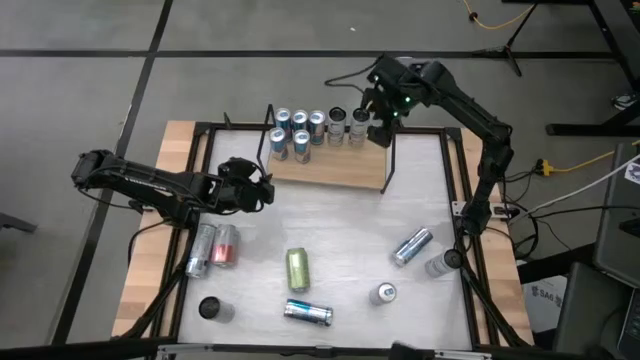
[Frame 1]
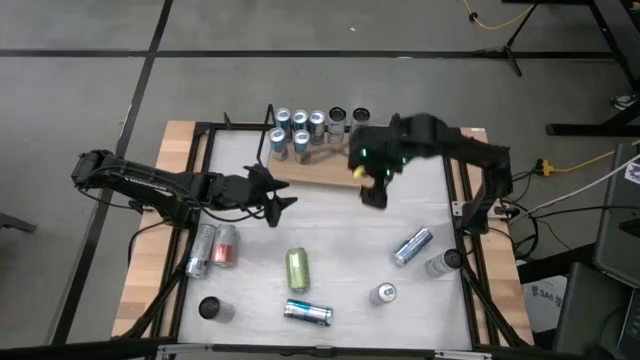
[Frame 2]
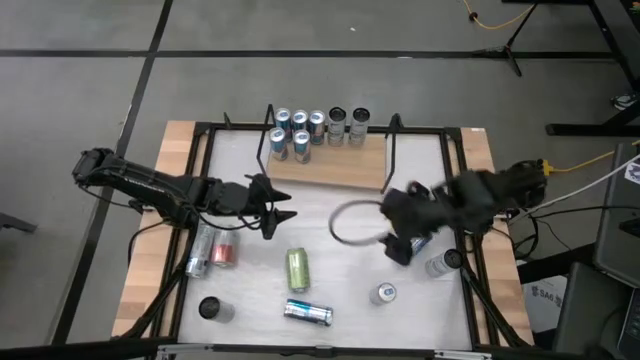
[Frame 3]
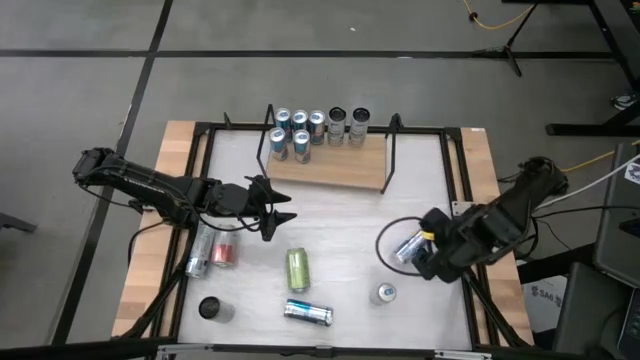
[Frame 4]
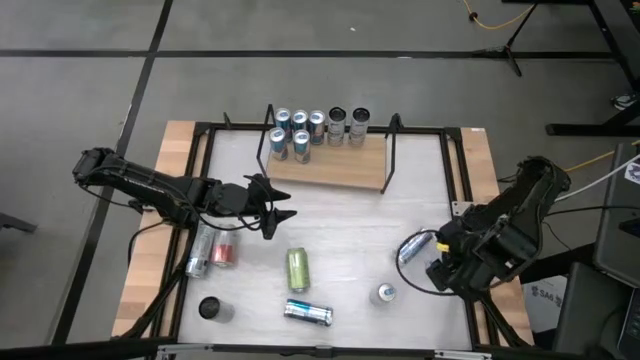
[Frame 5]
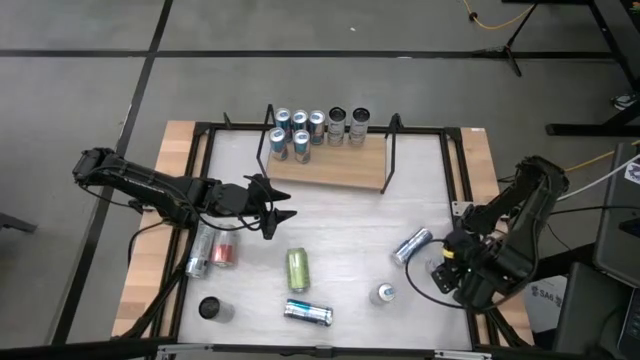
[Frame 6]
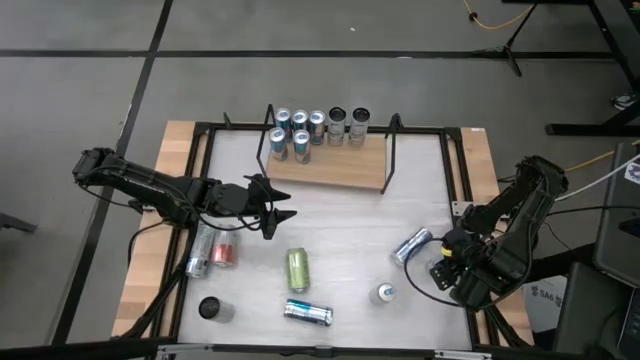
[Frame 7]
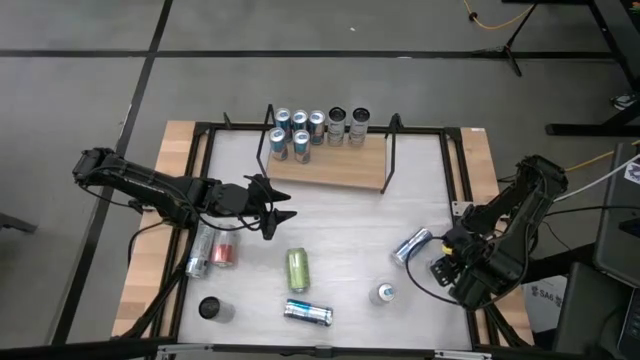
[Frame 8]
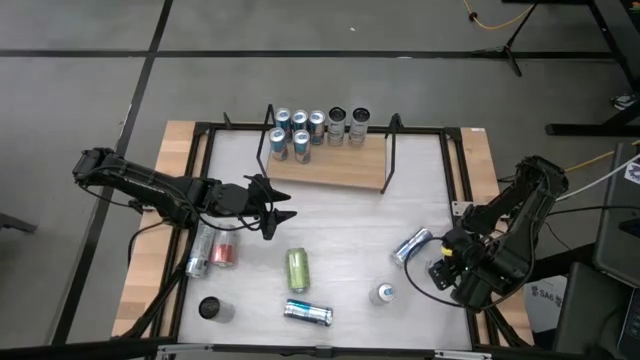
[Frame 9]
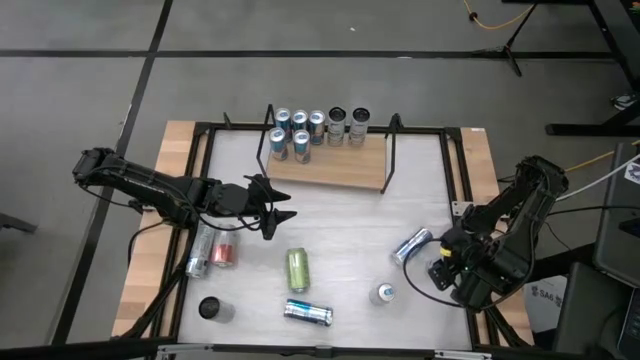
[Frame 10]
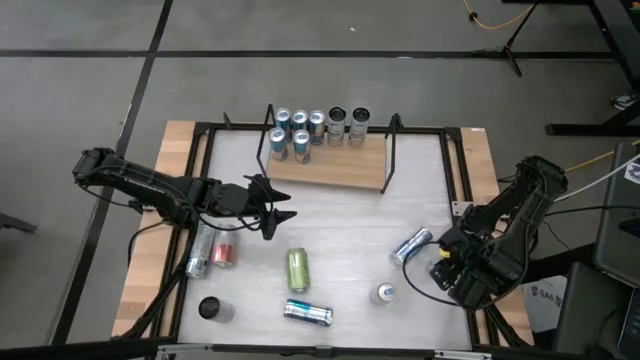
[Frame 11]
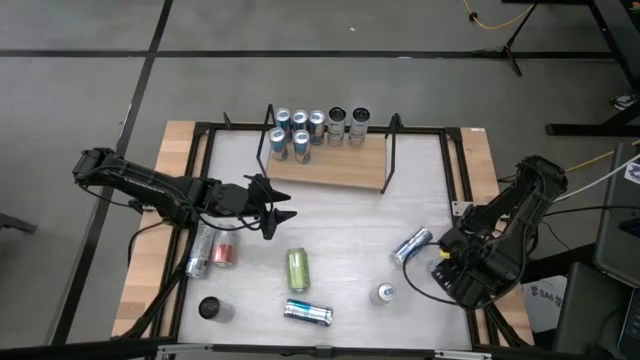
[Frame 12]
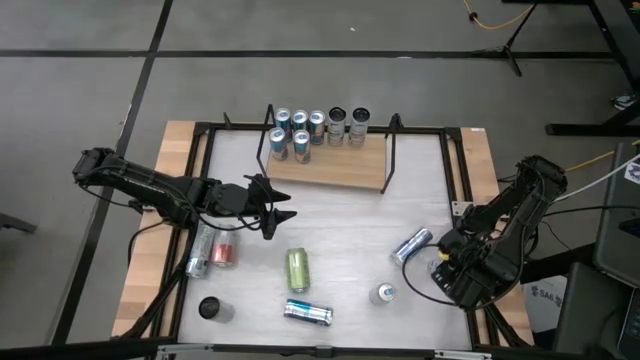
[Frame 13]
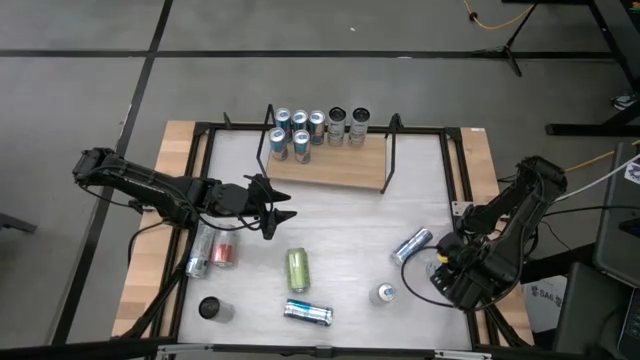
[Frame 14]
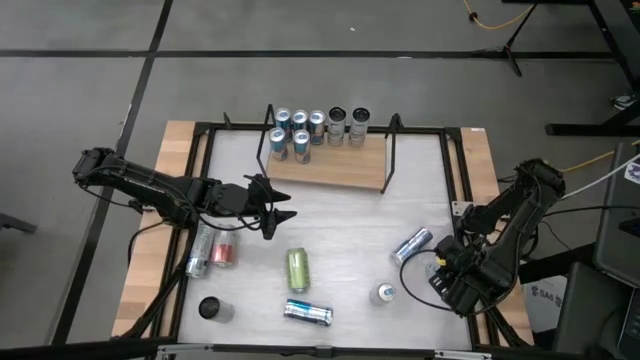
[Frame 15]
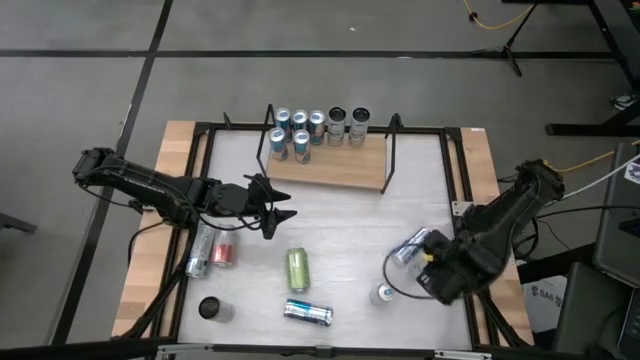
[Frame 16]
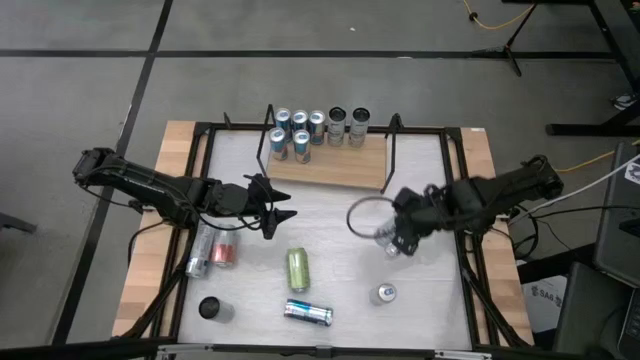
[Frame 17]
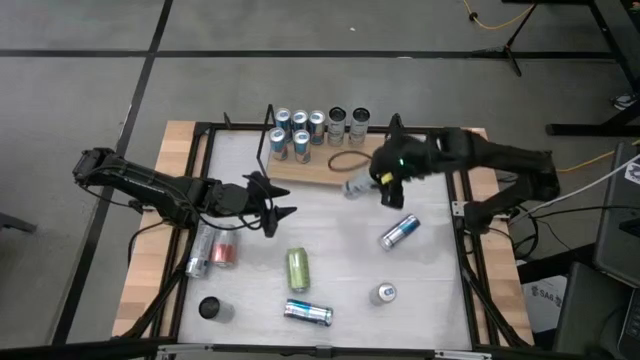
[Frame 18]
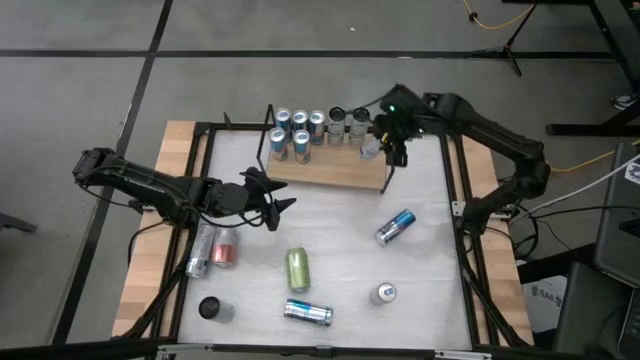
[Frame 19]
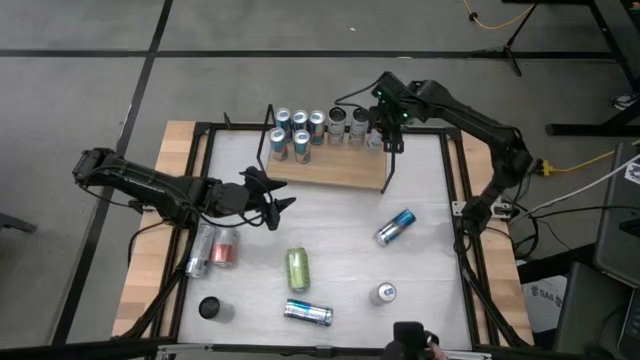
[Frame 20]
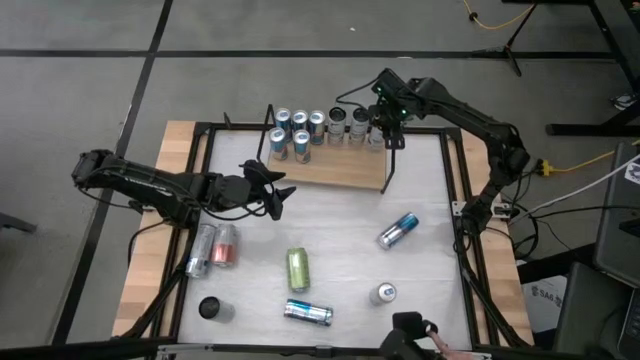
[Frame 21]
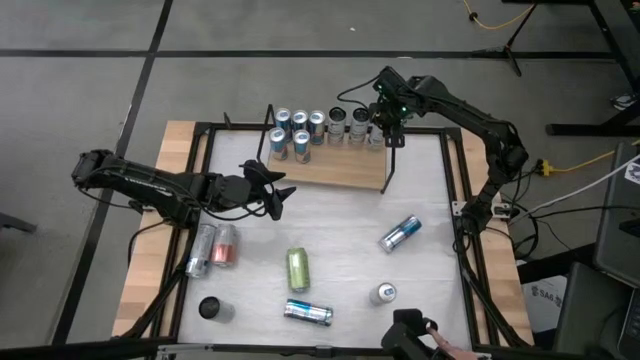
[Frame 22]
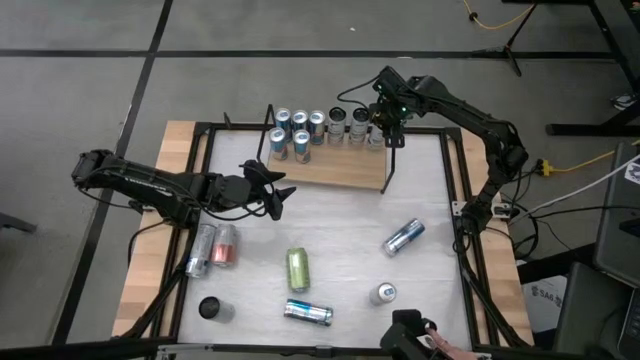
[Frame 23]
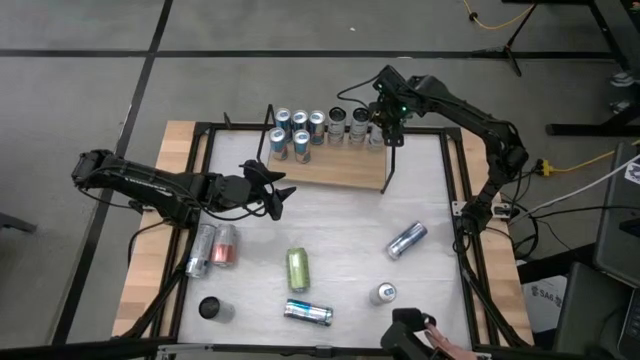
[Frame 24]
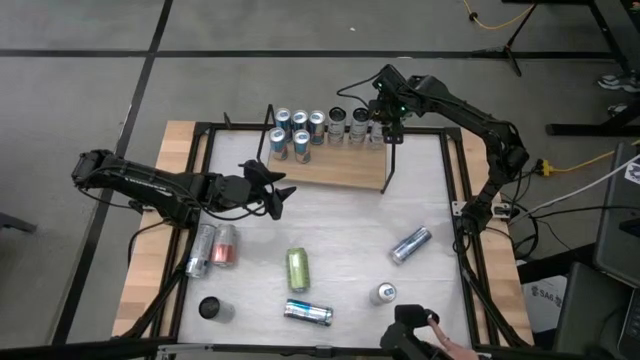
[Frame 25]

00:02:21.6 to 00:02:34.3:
Task: Place canned beverage on shelf
Put the white blue soda can on the shelf

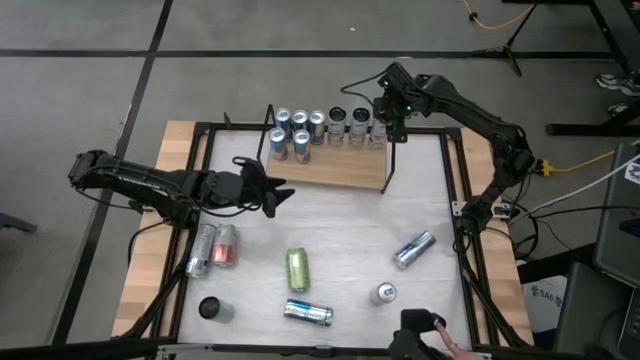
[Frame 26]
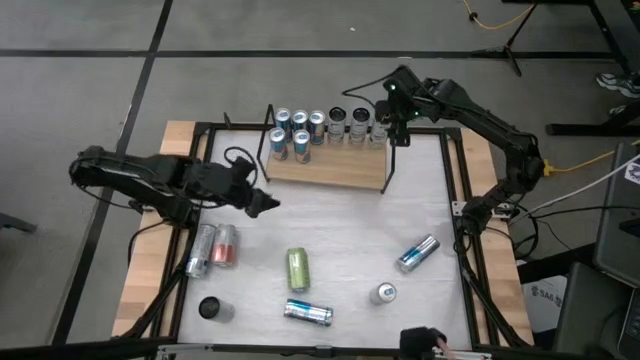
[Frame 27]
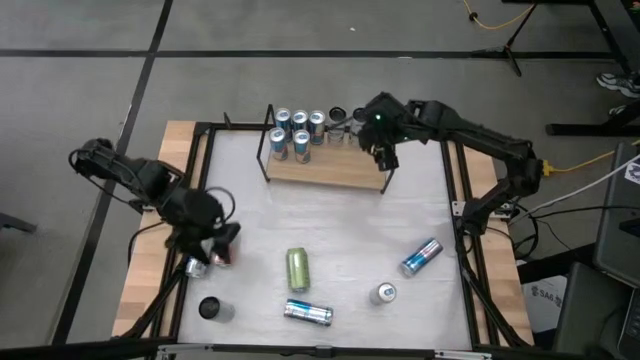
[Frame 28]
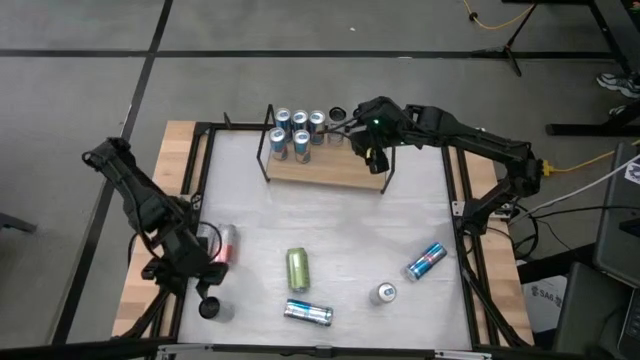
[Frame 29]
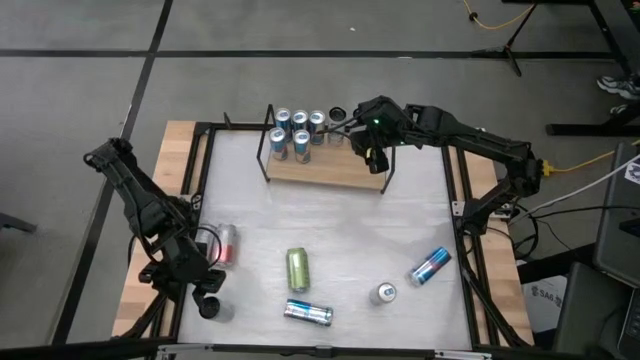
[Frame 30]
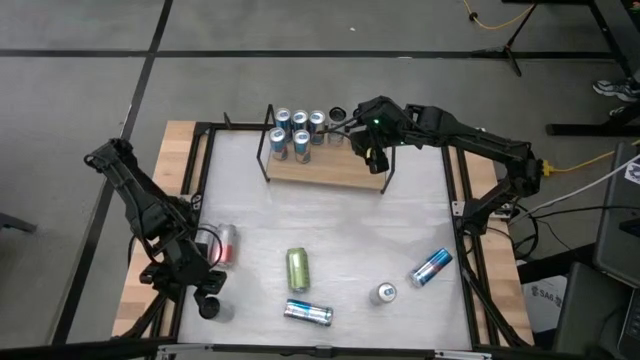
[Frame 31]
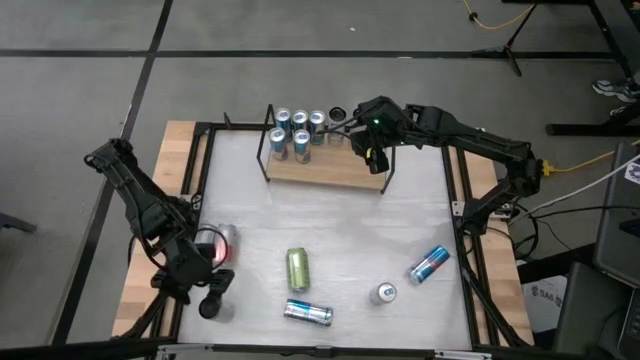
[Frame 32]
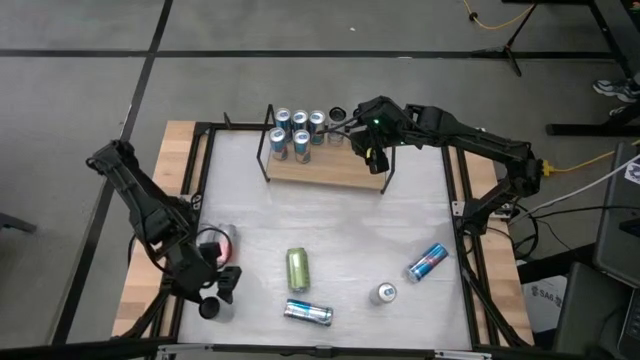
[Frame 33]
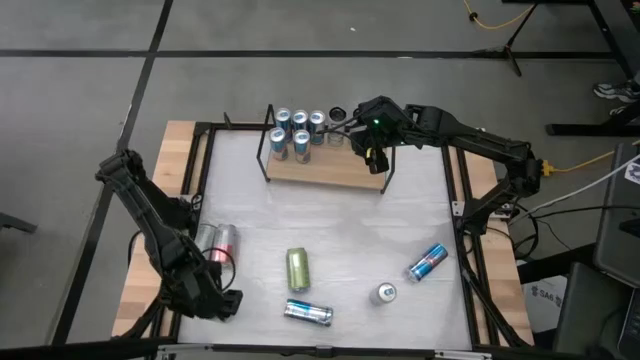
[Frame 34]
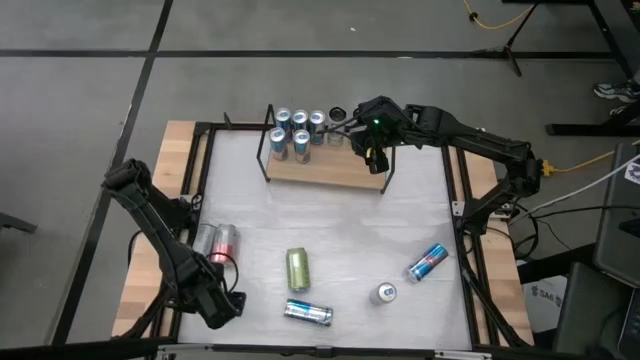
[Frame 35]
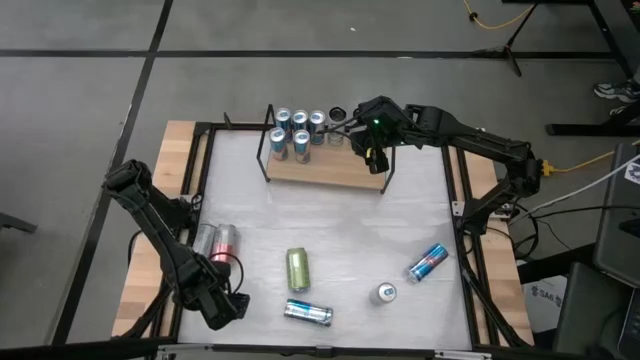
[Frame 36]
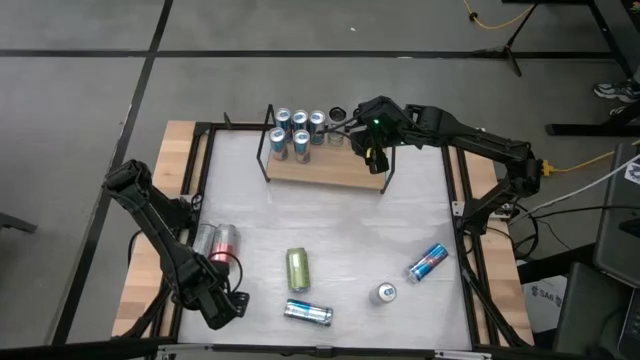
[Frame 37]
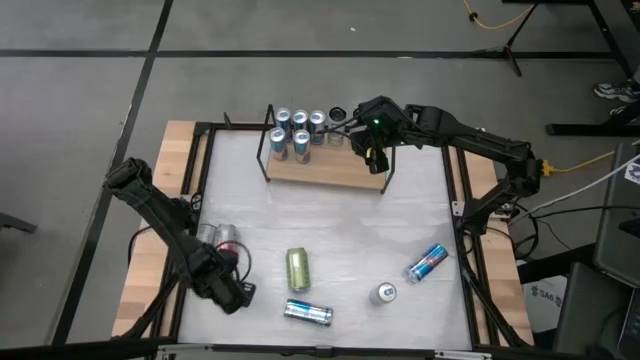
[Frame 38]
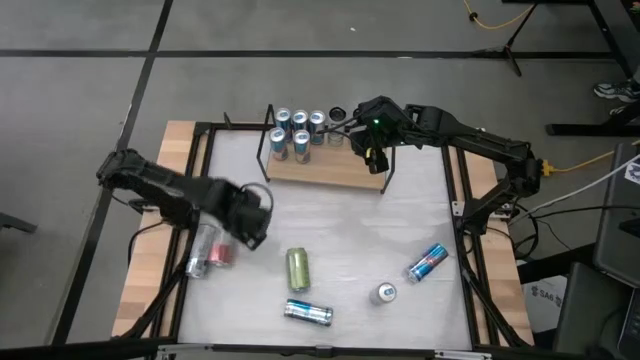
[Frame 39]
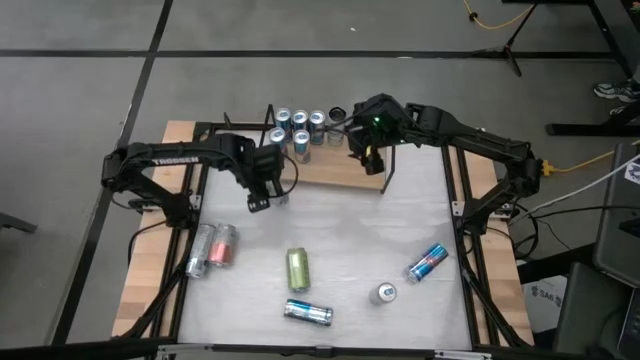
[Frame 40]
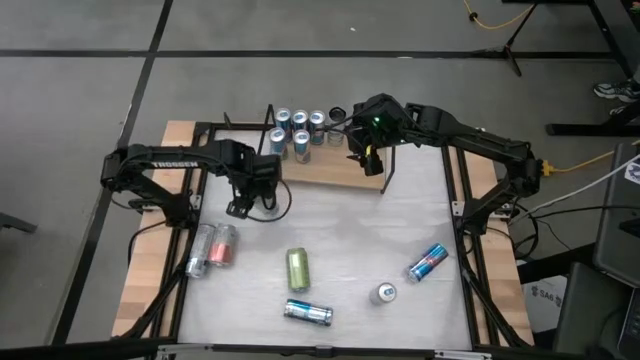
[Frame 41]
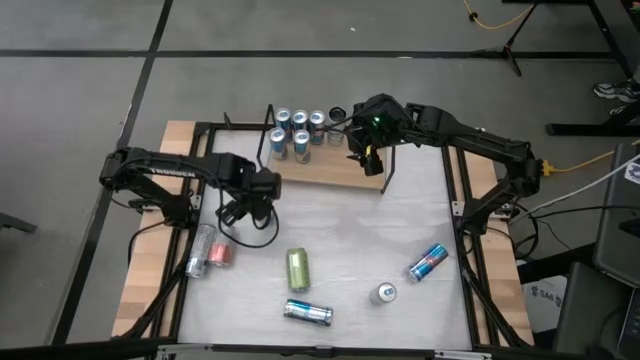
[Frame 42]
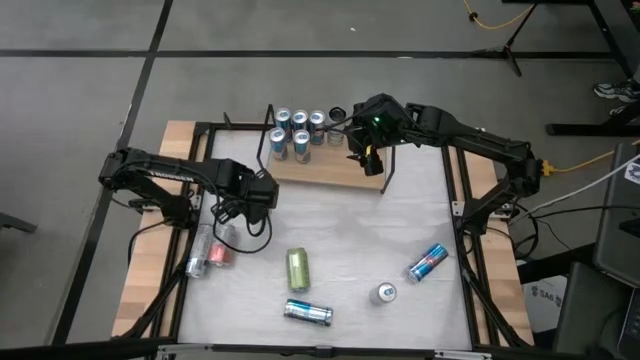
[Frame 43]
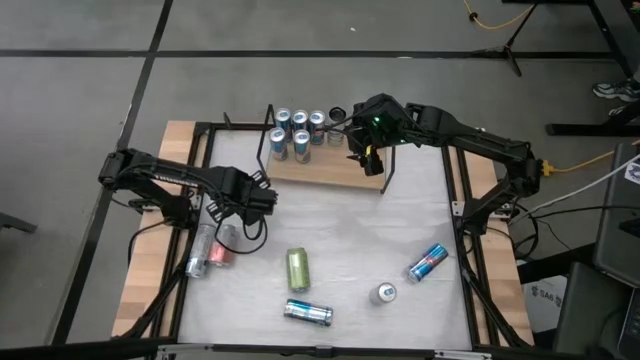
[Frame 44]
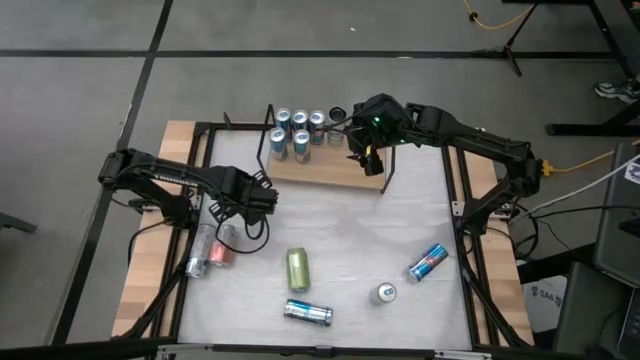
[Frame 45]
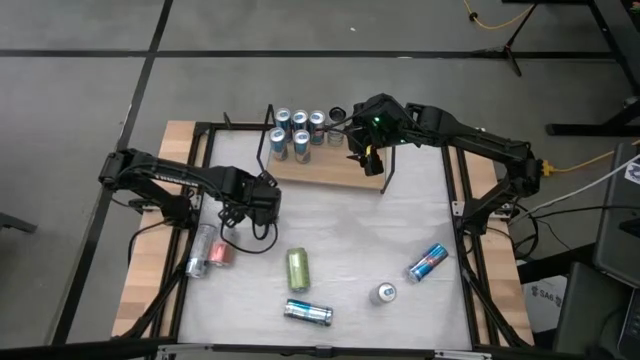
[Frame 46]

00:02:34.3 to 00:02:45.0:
Put the white blue soda can on the shelf
